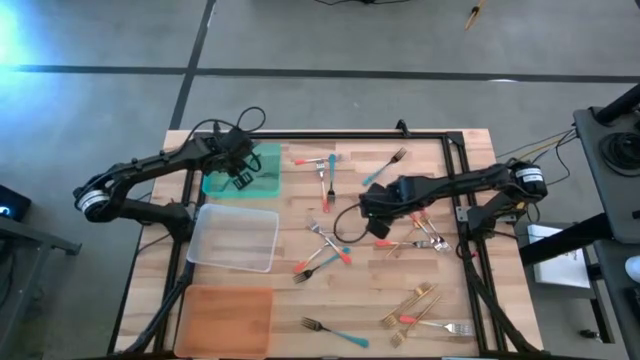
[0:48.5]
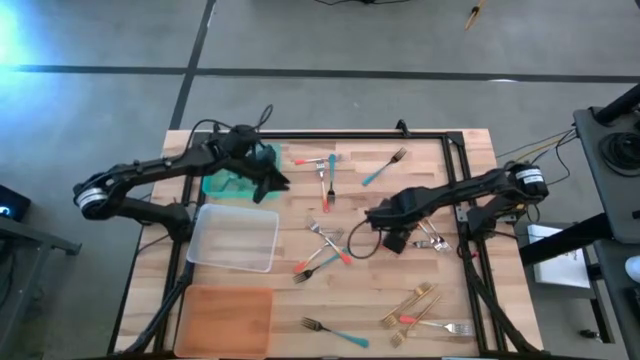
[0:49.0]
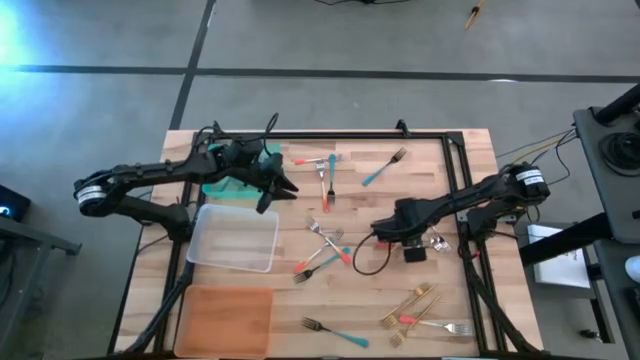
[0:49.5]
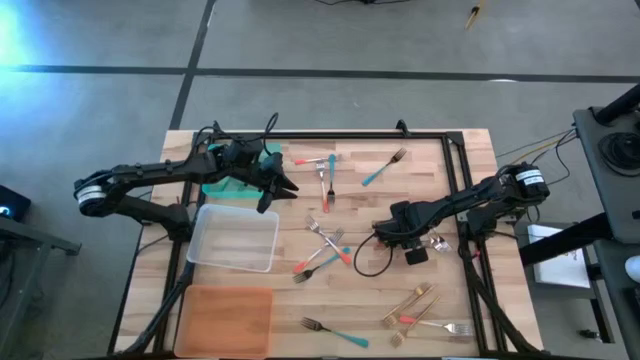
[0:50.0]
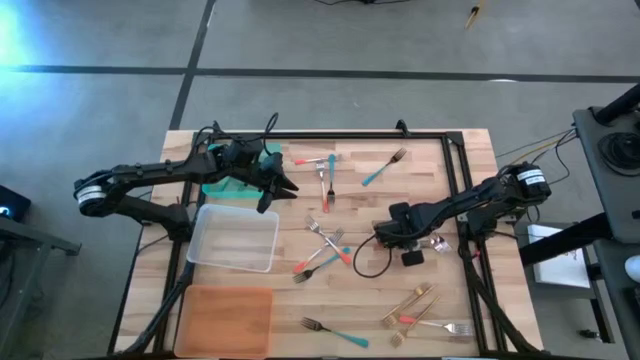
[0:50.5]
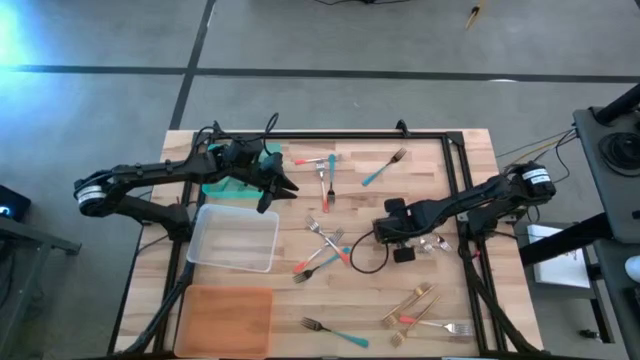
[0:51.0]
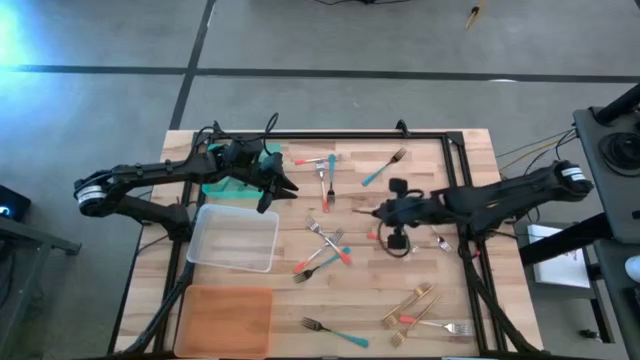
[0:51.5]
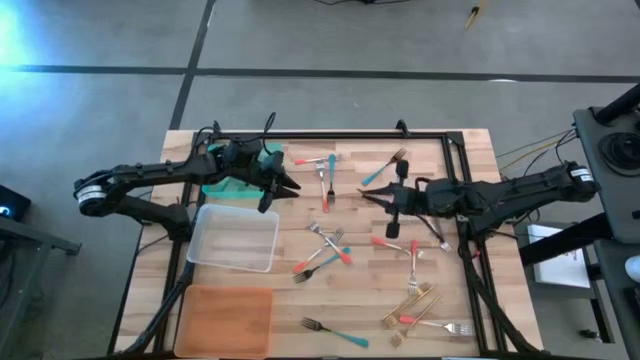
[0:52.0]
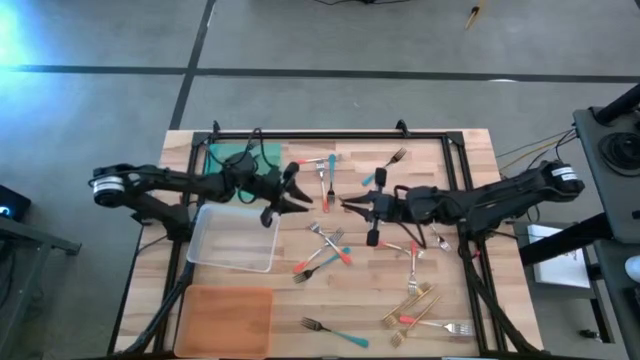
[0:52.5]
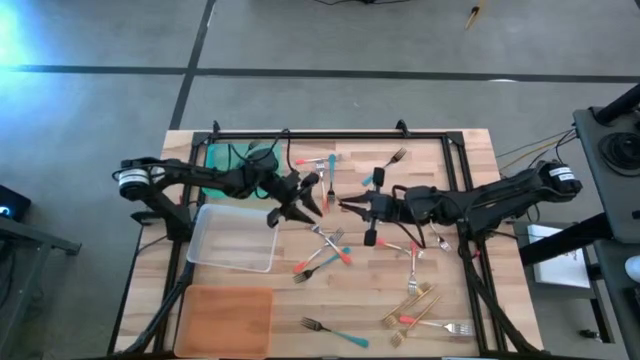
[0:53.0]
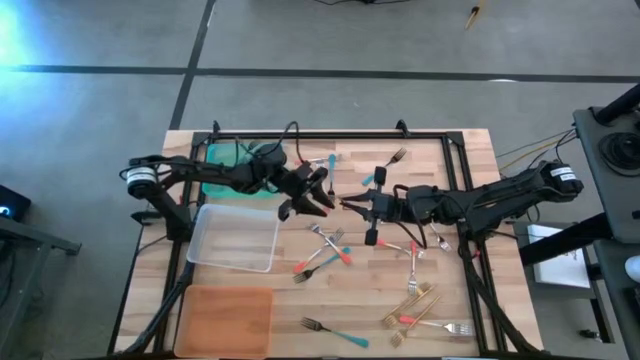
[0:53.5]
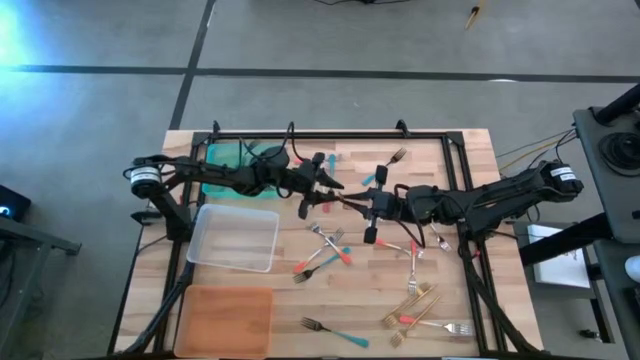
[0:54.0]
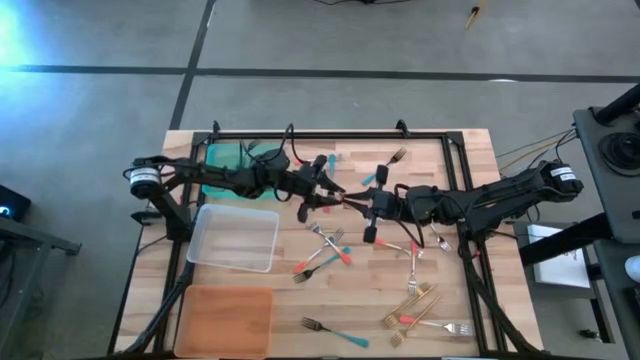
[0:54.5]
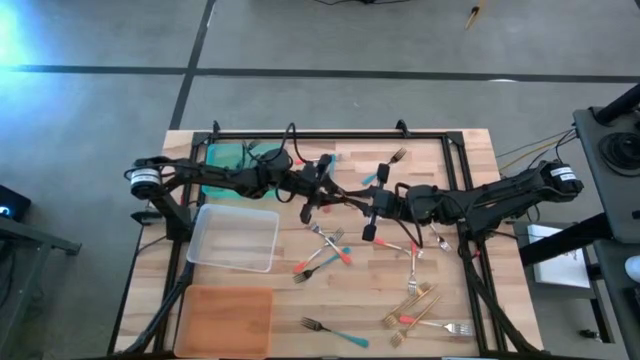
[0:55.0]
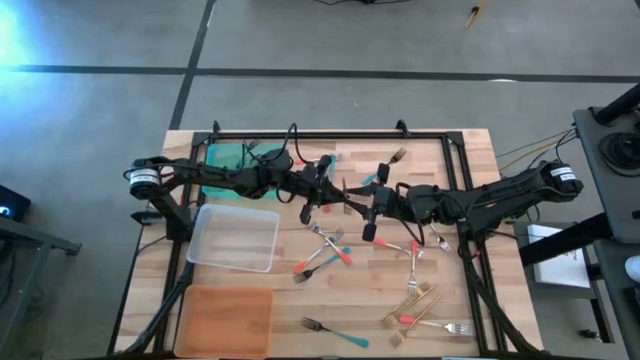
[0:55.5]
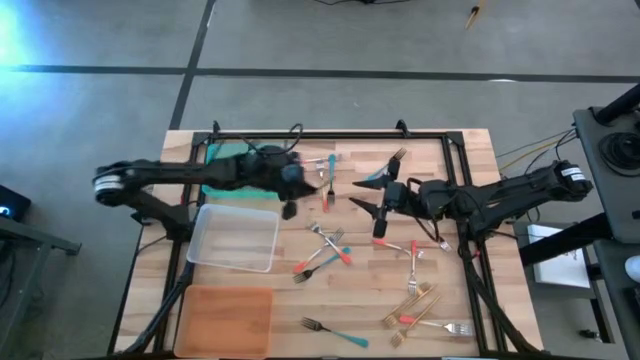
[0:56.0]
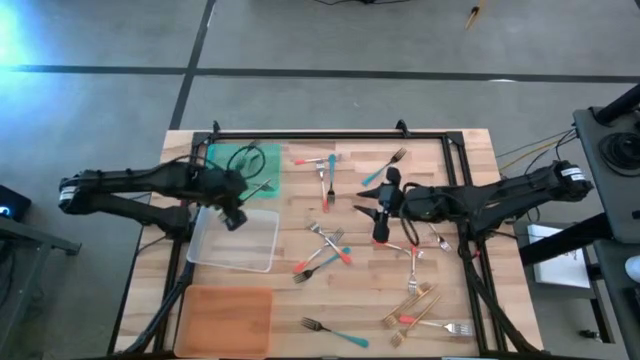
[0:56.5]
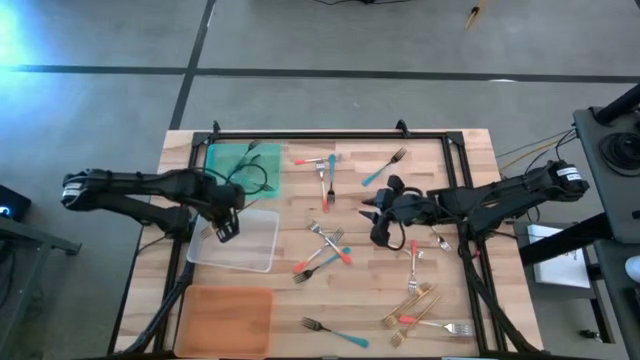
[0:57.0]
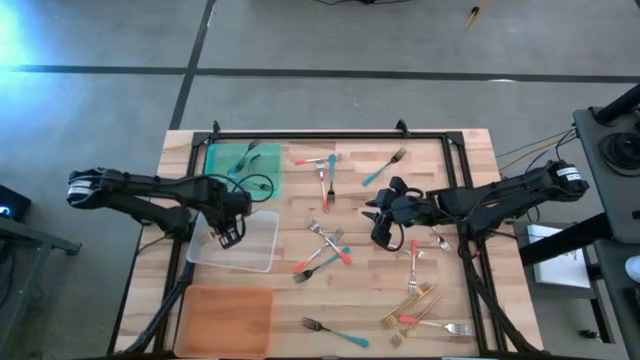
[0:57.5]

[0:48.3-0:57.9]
Task: Sort silverware by color (type)
Put the gold fork into the transparent bin

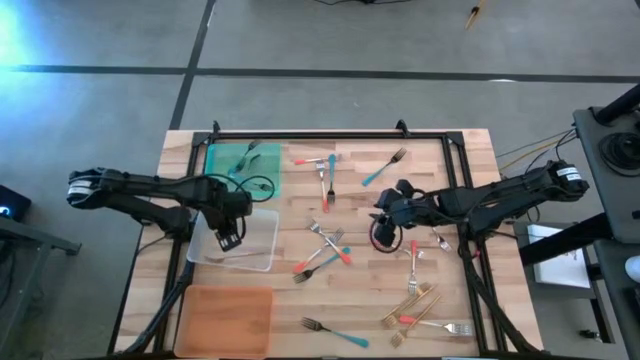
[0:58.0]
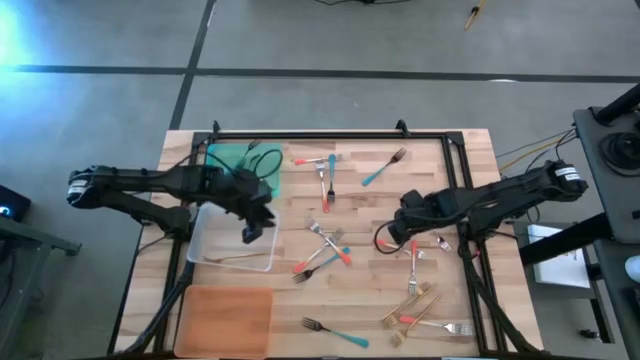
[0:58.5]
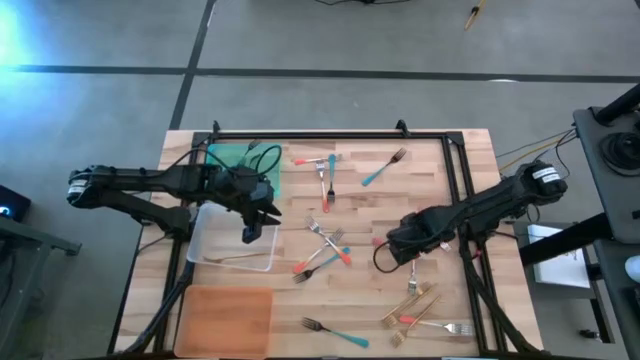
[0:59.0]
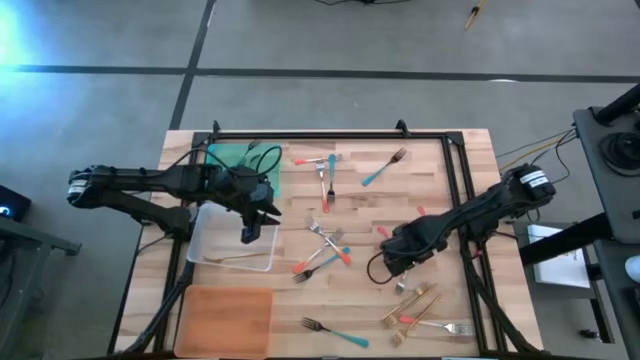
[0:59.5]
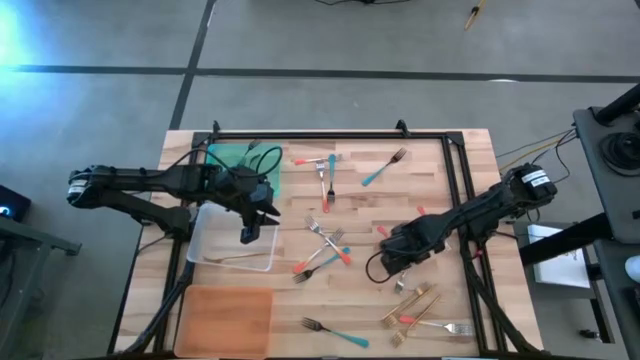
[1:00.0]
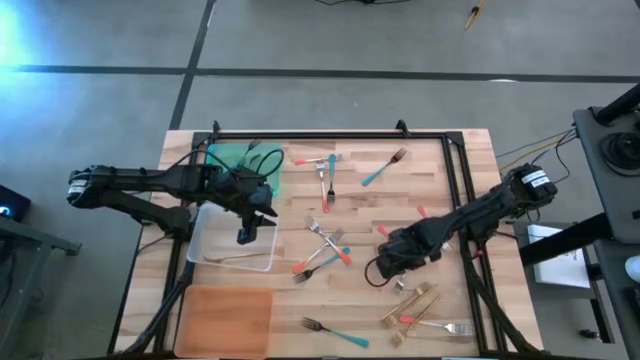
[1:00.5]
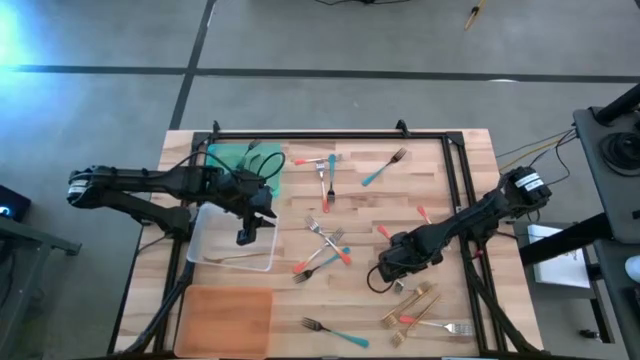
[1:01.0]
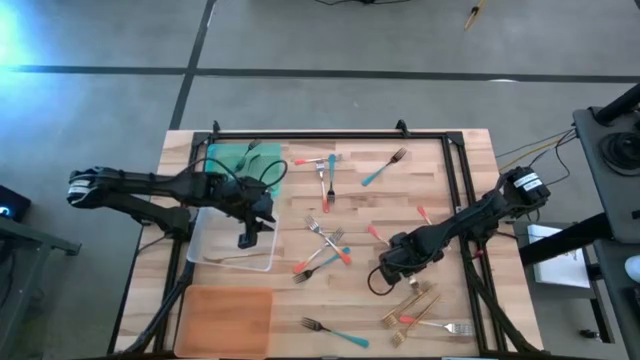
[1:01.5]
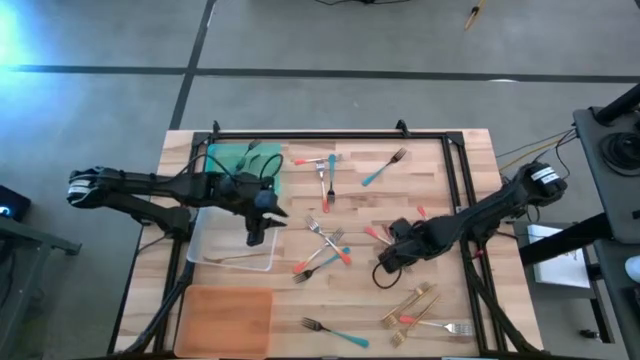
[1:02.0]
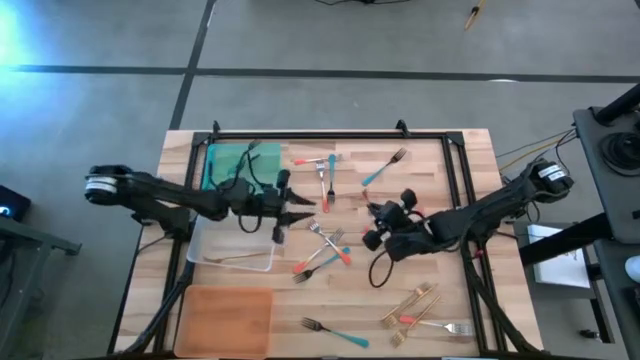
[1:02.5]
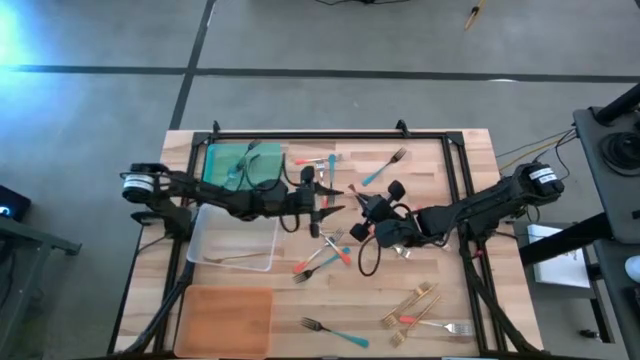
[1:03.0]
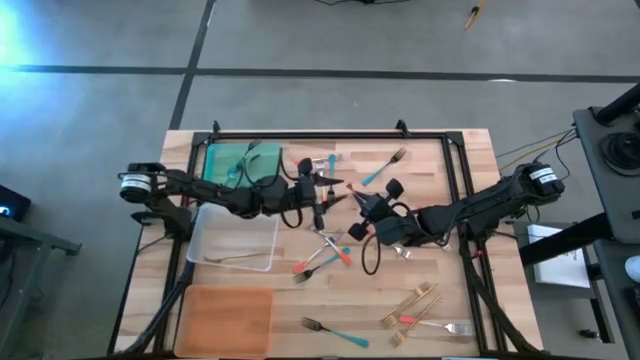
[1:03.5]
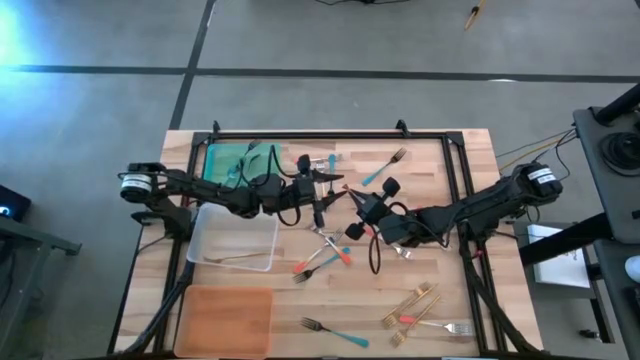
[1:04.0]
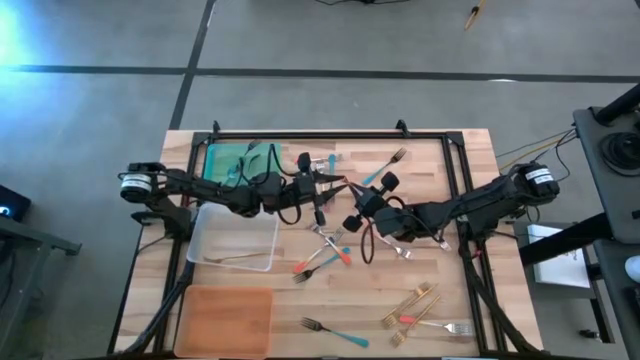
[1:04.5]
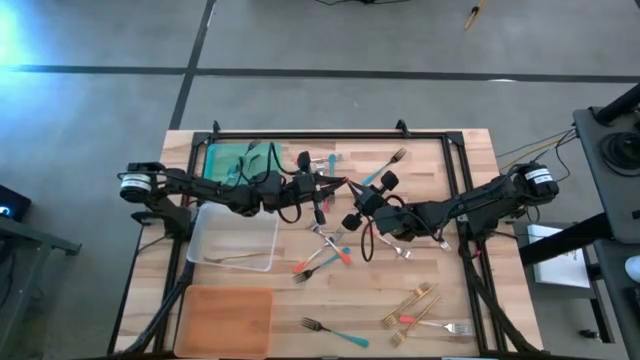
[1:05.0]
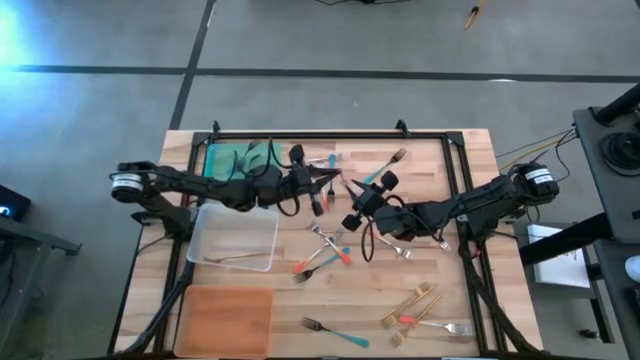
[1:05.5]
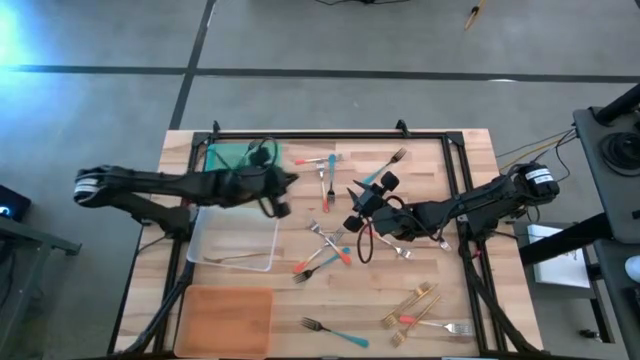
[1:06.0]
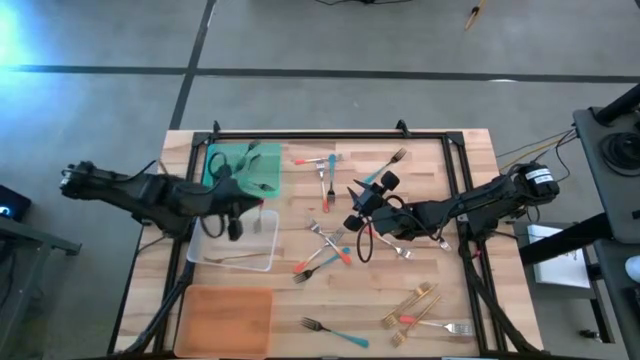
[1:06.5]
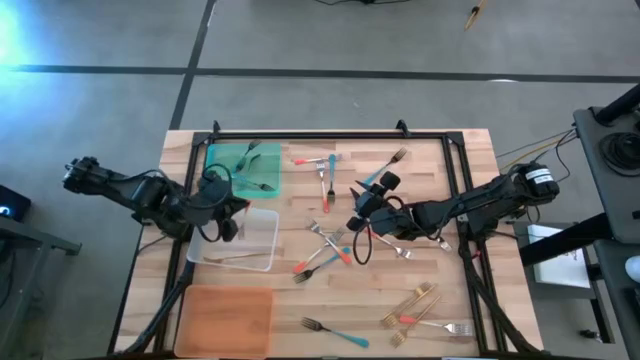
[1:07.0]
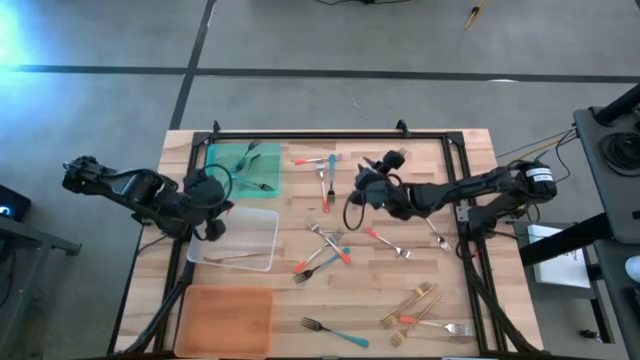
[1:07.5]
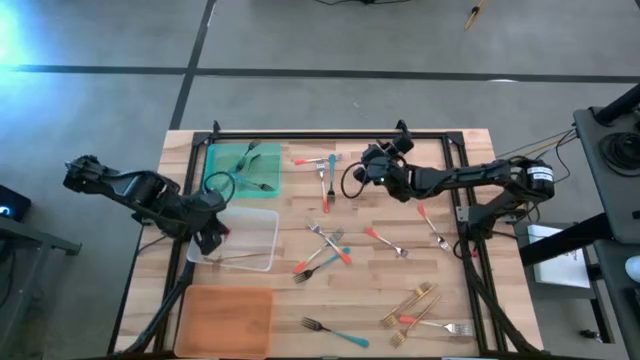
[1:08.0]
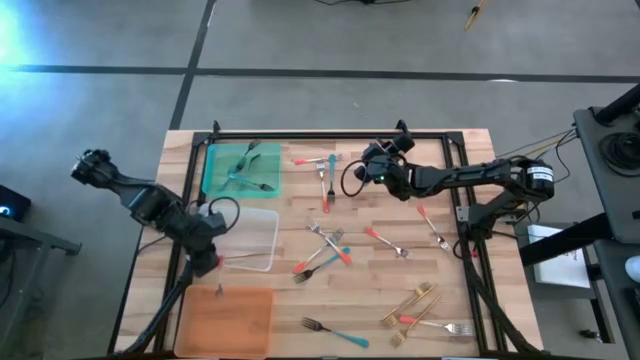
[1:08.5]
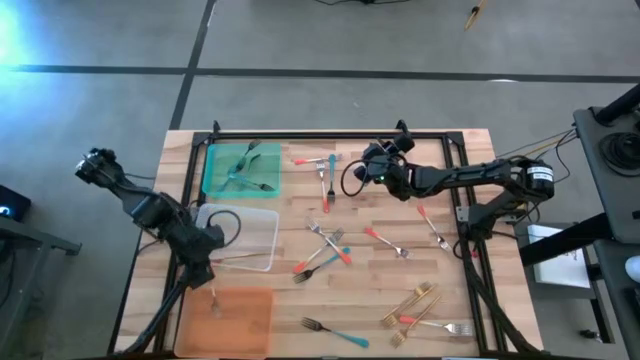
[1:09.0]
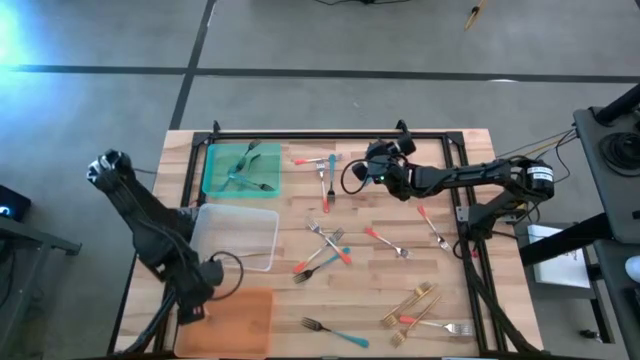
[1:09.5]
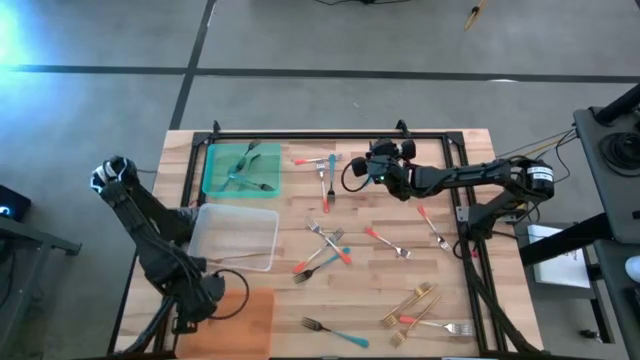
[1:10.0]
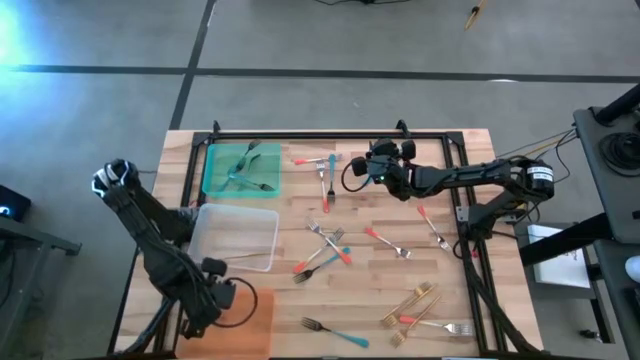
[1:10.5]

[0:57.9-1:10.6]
Put the orange fork into the orange bin
